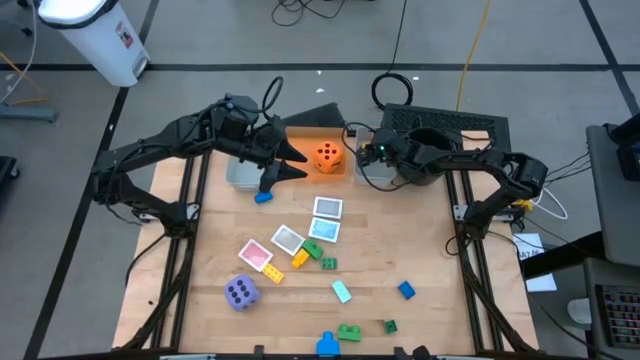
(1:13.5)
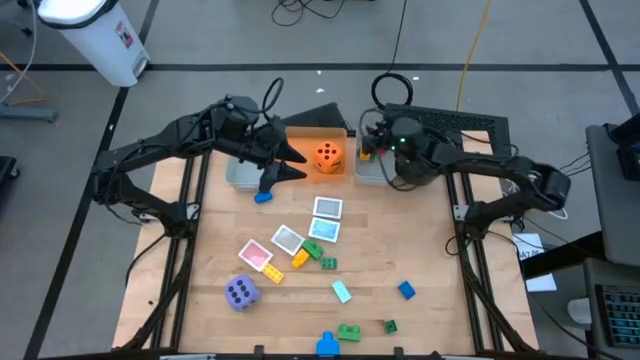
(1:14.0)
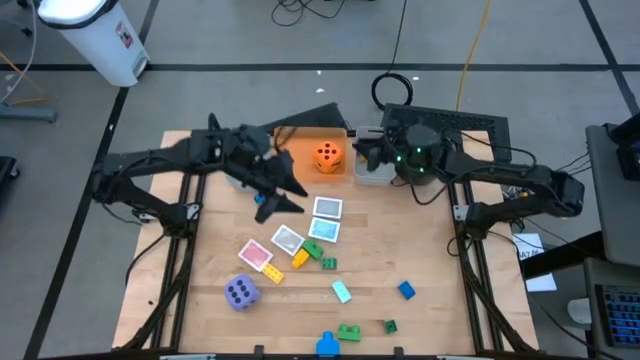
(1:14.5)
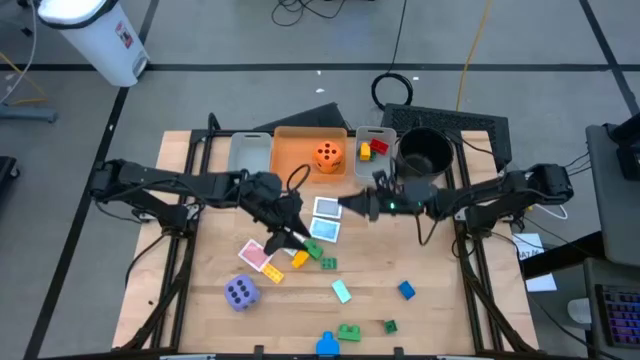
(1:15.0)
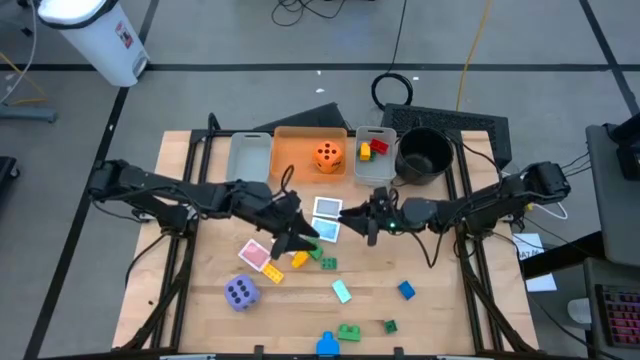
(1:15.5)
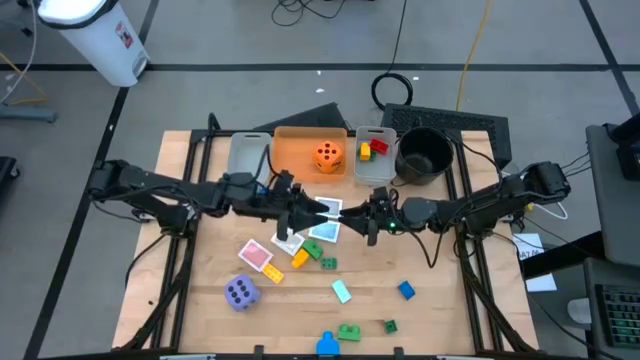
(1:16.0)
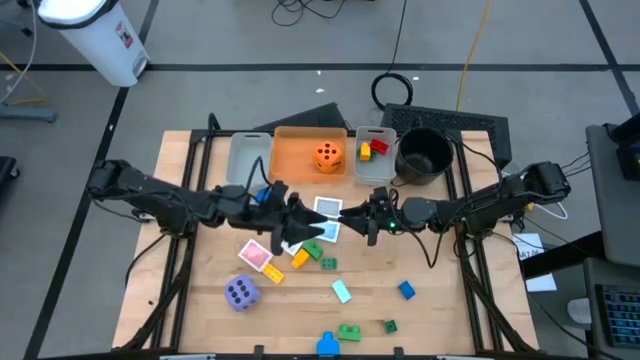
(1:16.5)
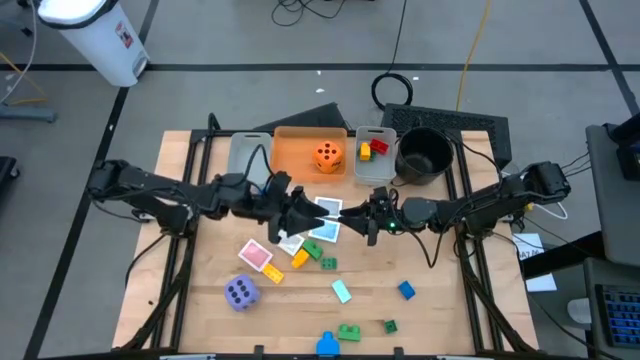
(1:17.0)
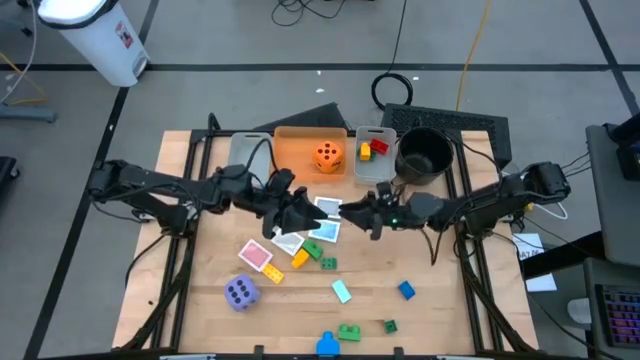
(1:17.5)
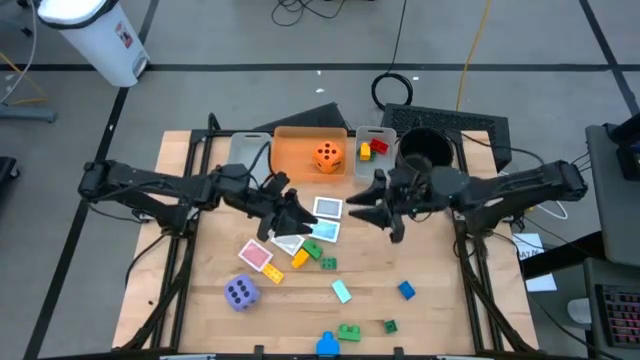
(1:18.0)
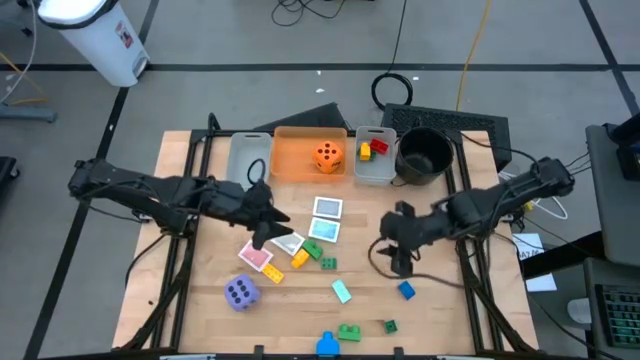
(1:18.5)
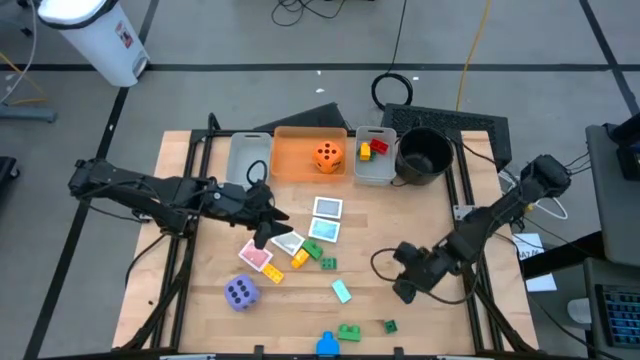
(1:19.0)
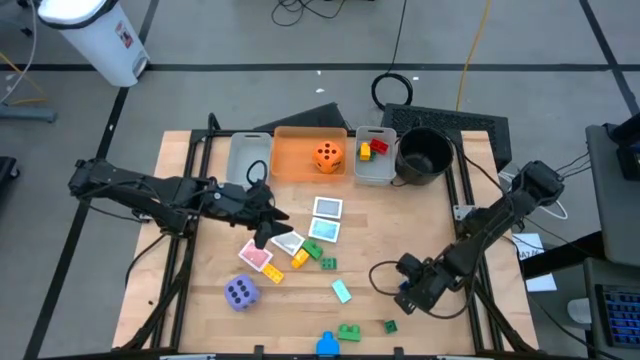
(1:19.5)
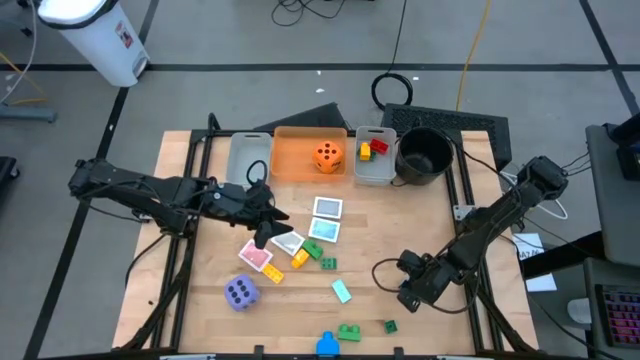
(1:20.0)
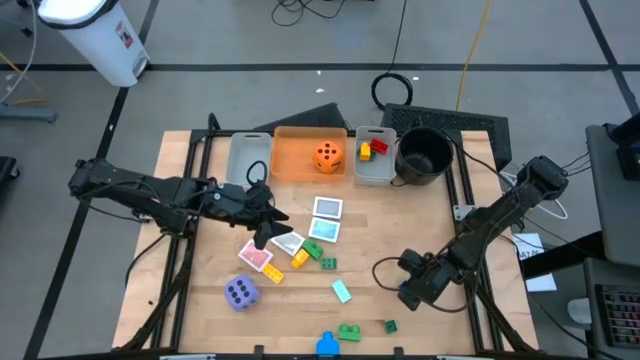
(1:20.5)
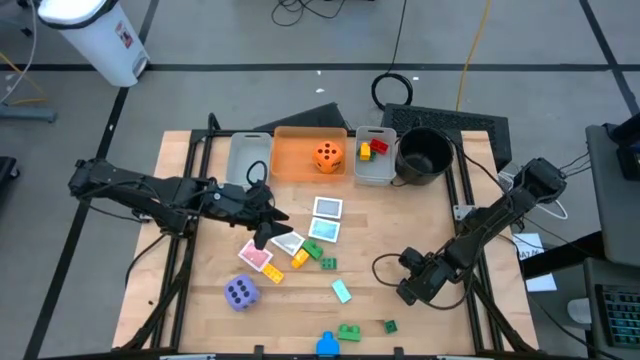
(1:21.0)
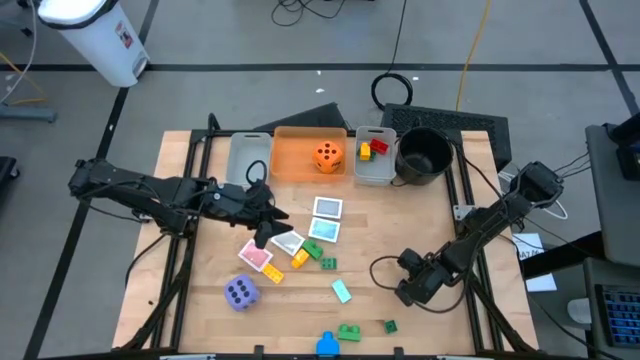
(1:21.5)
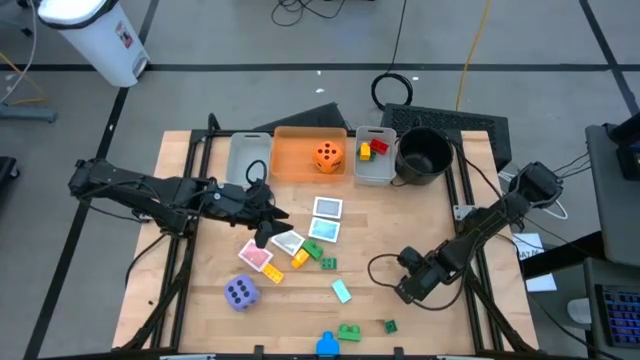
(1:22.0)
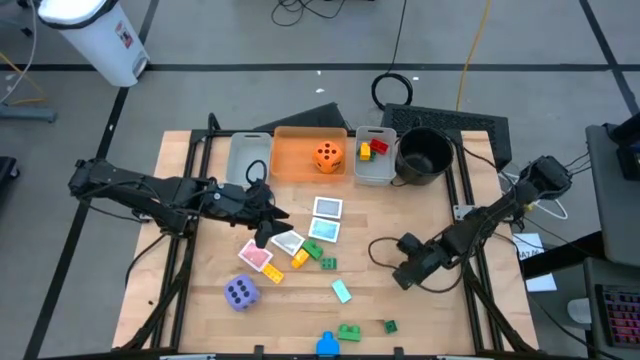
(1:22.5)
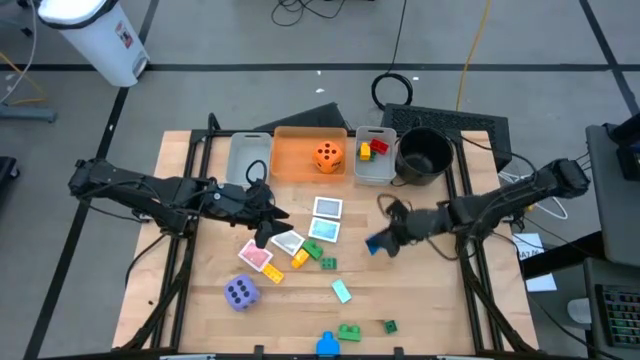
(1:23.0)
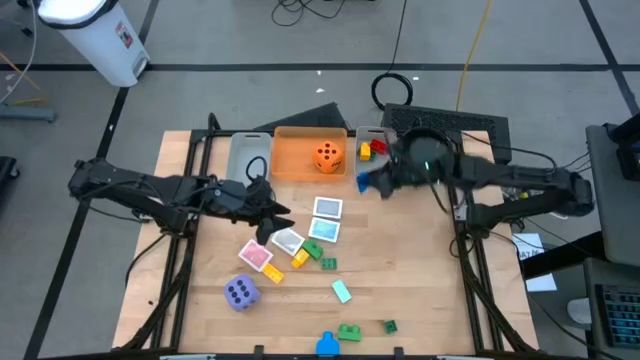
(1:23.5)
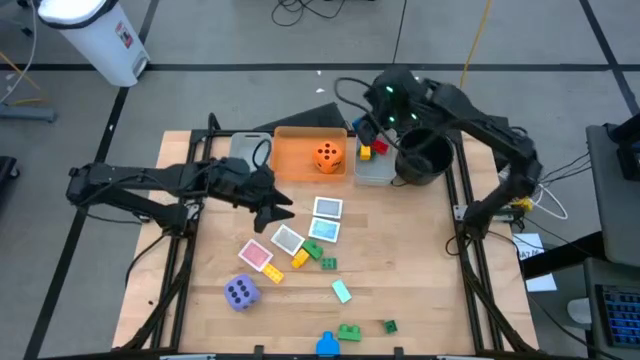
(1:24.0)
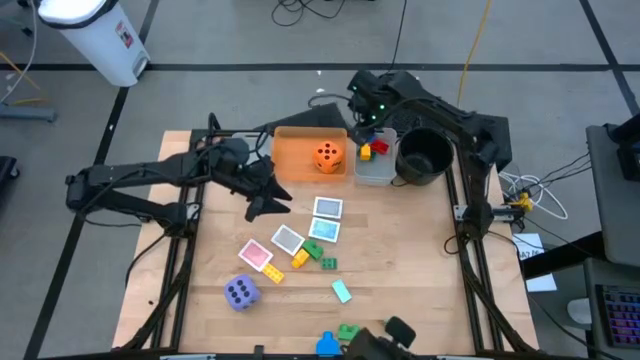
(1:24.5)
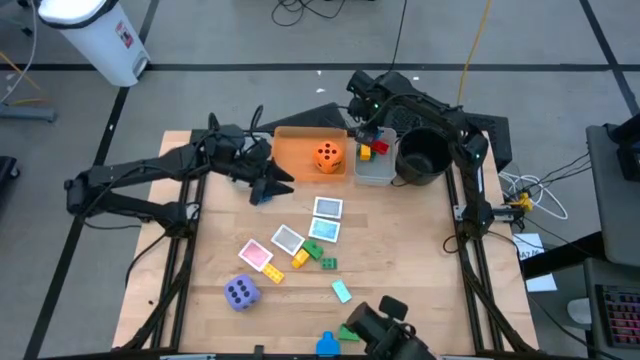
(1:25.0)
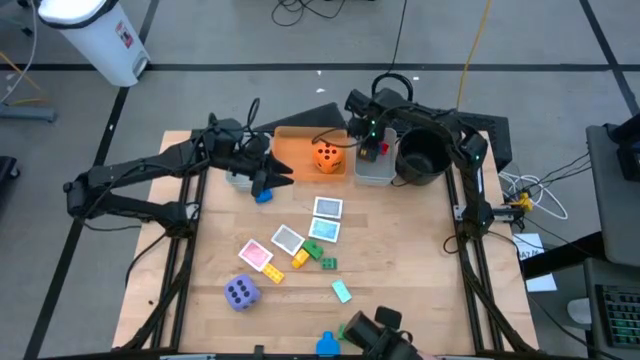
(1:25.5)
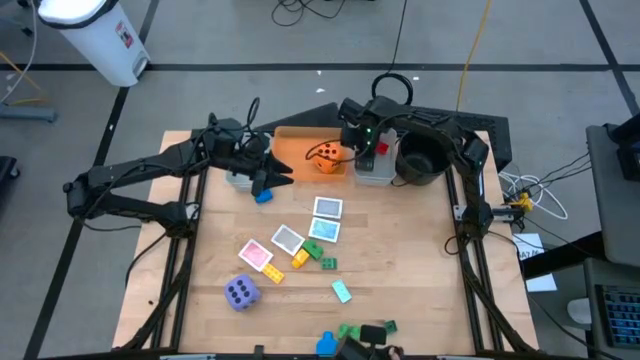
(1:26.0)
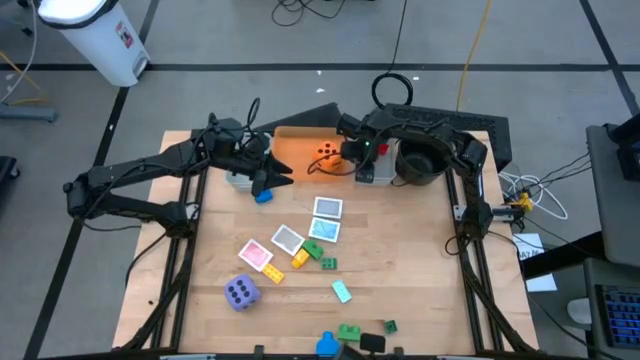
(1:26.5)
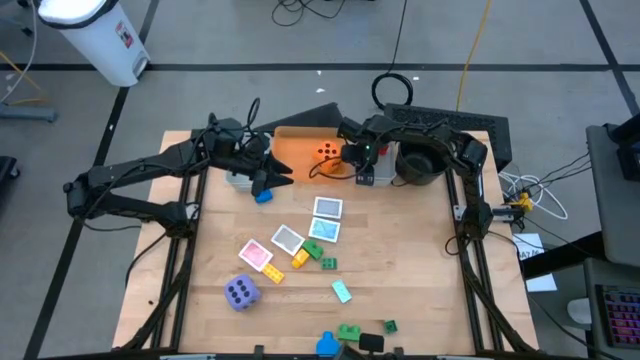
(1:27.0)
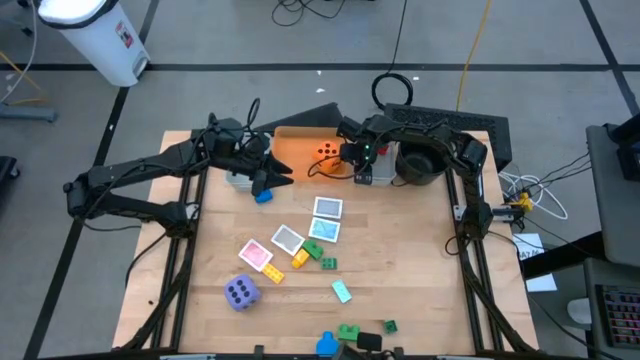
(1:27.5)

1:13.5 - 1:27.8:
Task: Pick & Place Toys
Put the blue game piece into the right gray bin

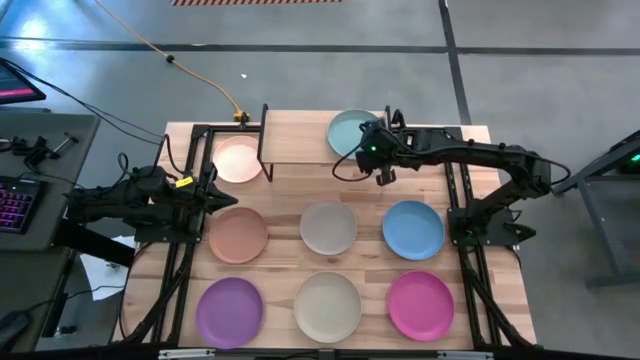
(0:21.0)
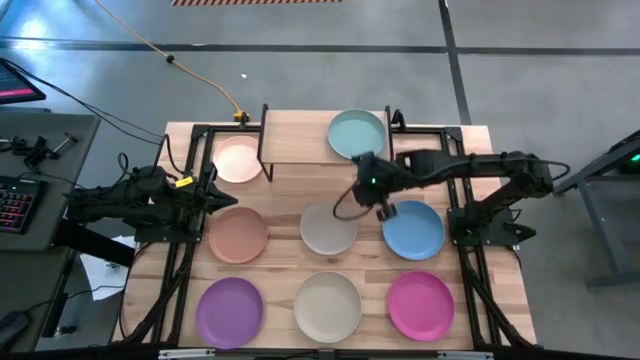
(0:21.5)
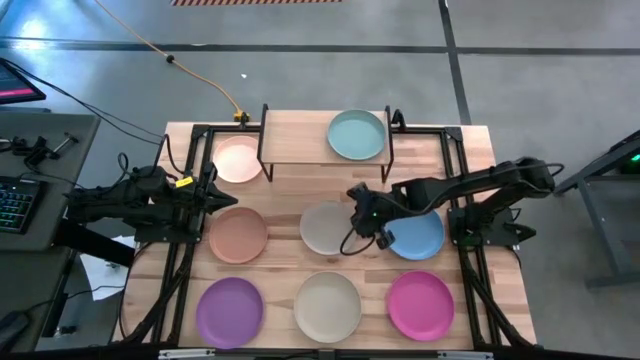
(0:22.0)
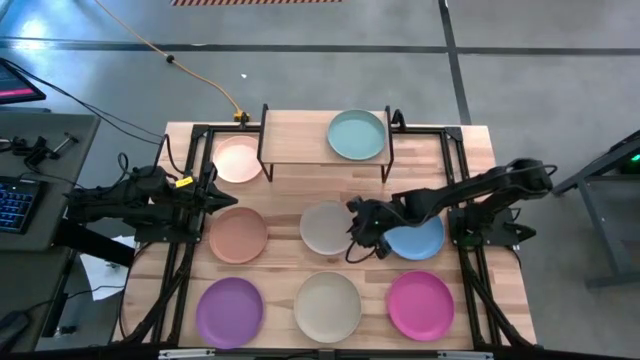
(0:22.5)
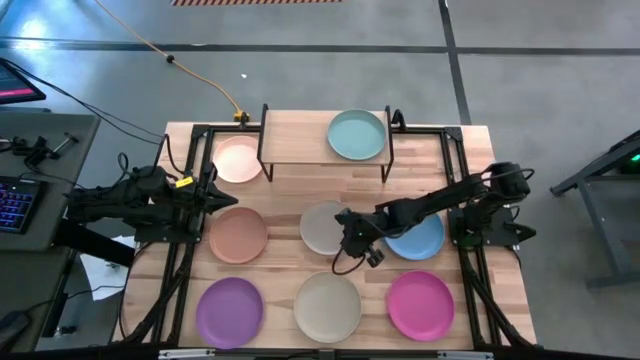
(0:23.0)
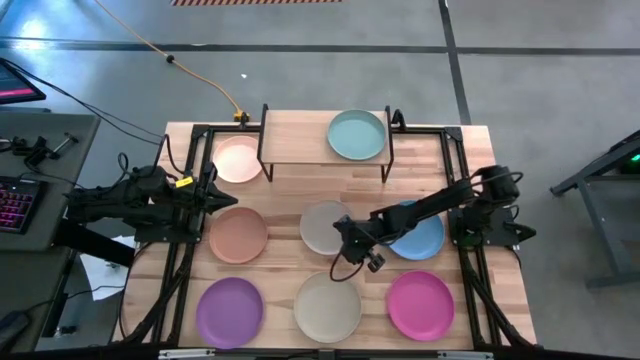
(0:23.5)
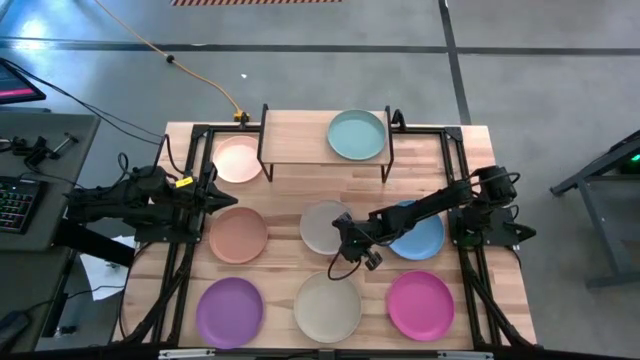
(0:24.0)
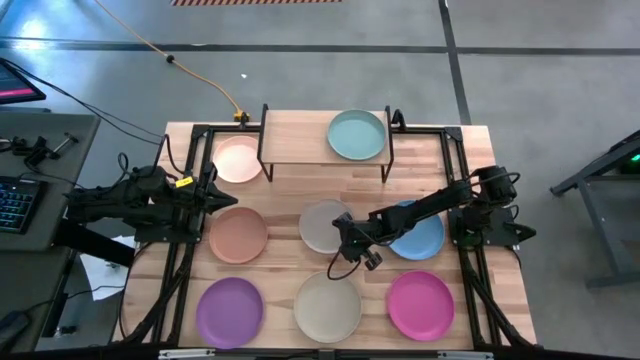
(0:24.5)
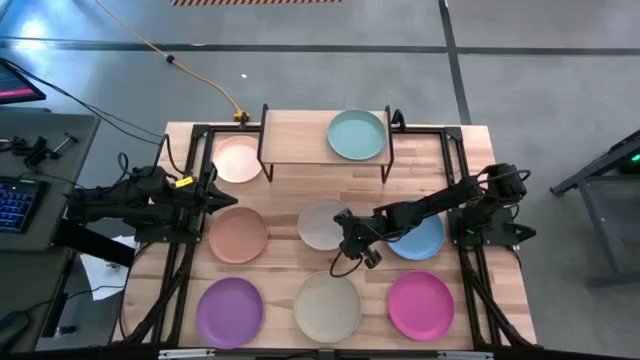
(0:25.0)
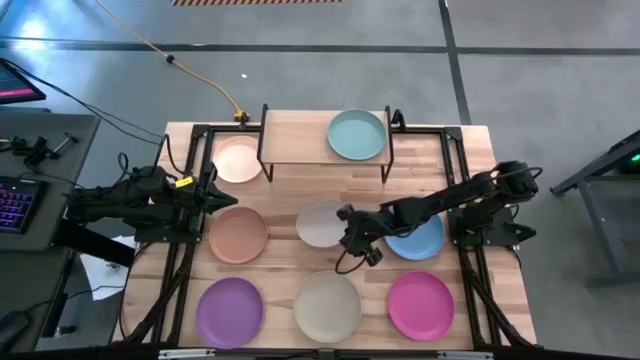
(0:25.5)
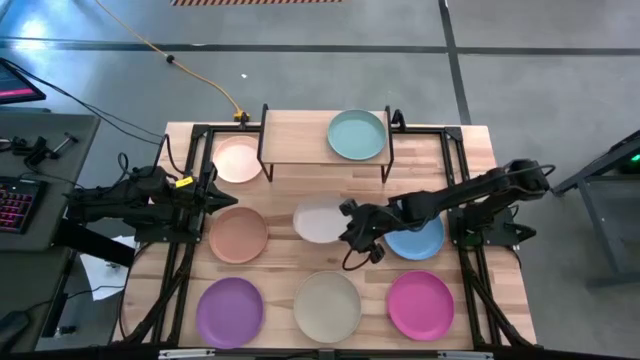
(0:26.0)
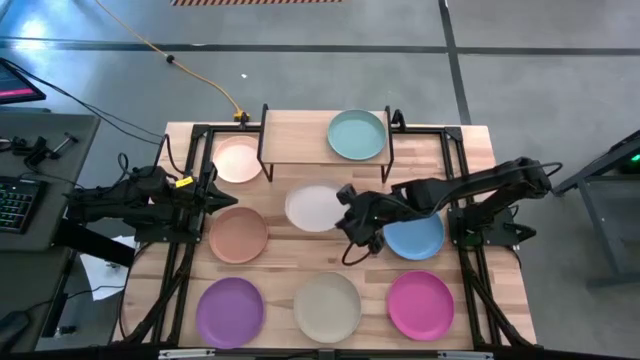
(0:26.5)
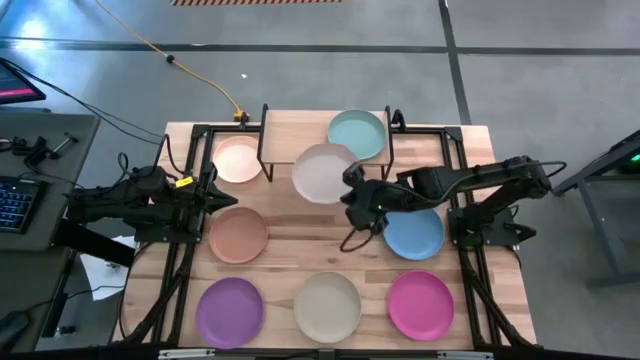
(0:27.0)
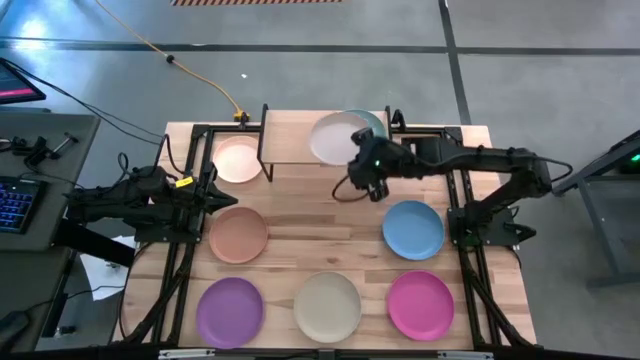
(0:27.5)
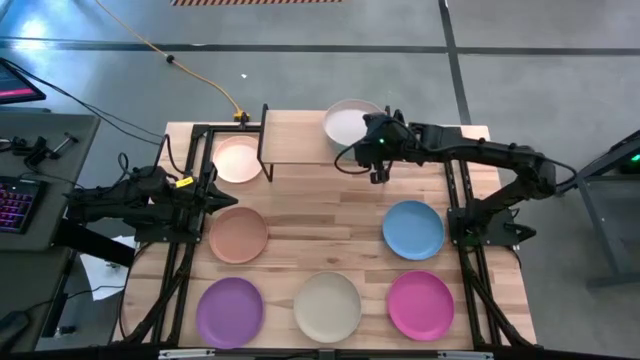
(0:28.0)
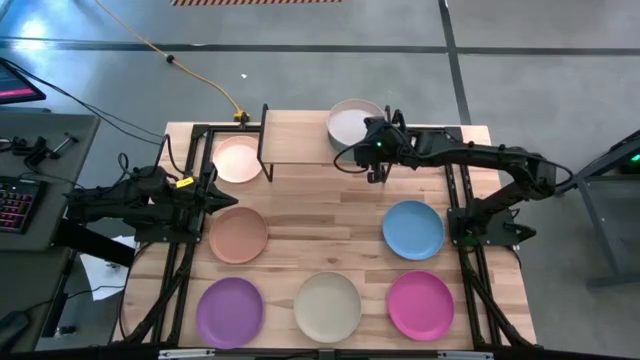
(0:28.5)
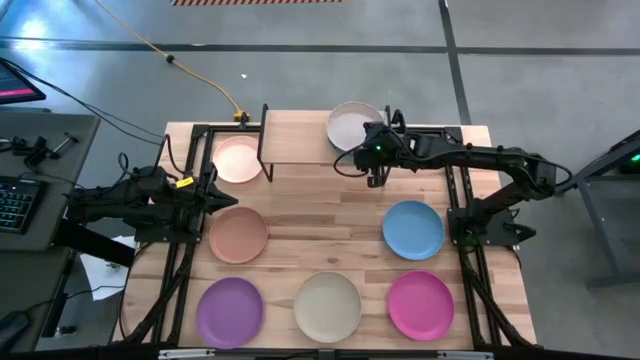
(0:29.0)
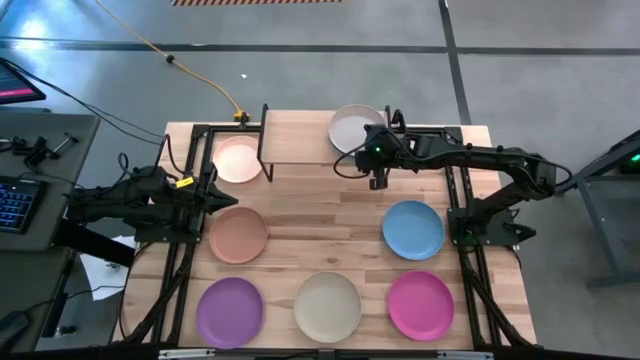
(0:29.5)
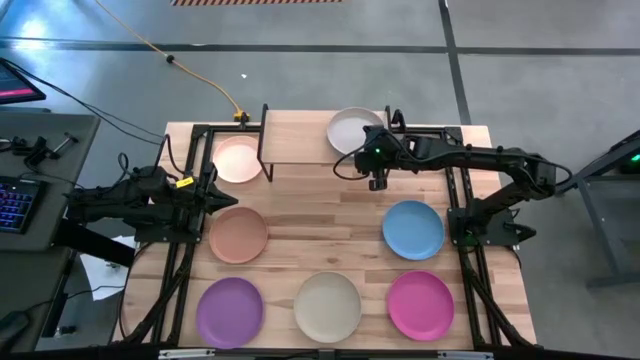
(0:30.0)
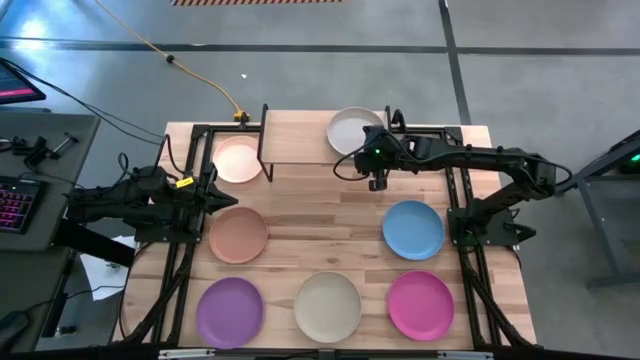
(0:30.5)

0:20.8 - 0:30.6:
Task: Place and stack plates onto a shelf
Stack the top light gray plate into the light green plate on the shelf
